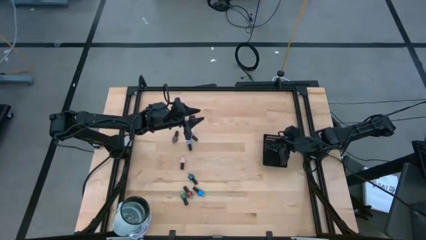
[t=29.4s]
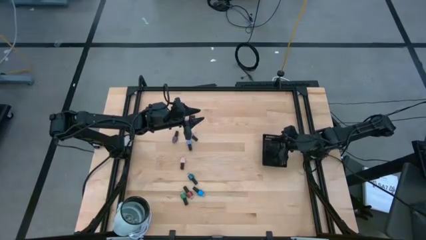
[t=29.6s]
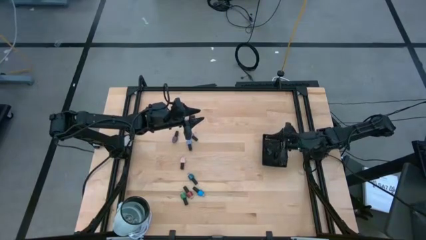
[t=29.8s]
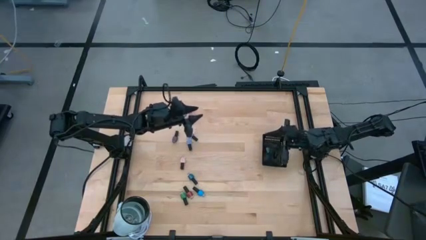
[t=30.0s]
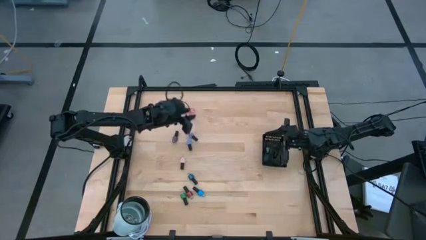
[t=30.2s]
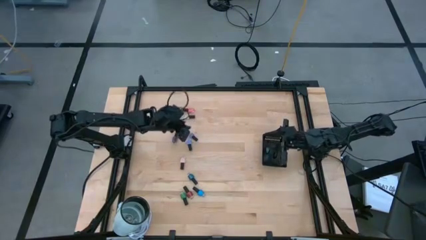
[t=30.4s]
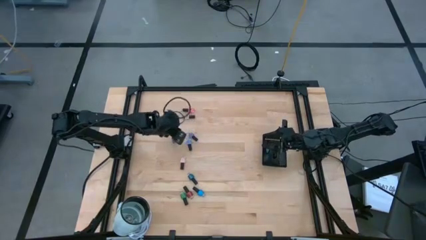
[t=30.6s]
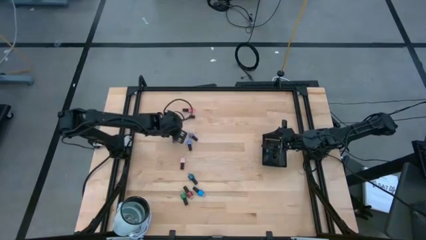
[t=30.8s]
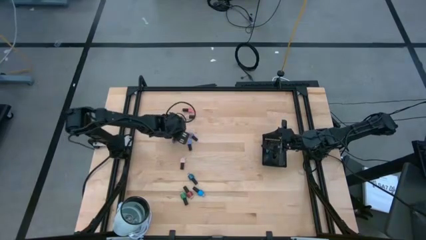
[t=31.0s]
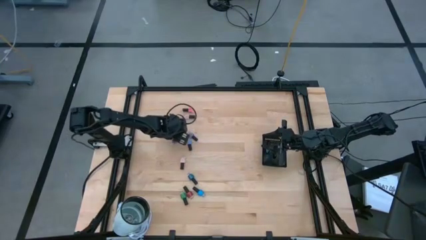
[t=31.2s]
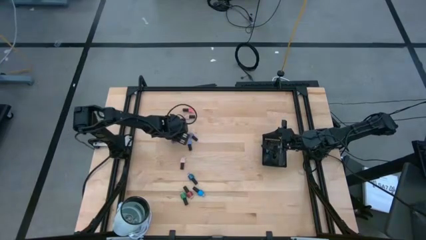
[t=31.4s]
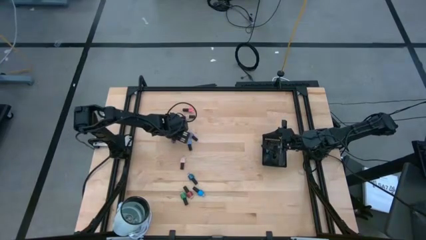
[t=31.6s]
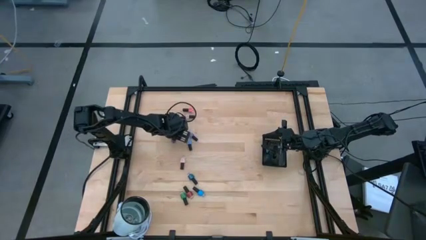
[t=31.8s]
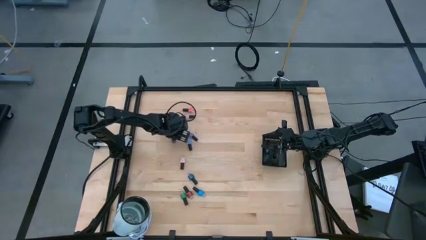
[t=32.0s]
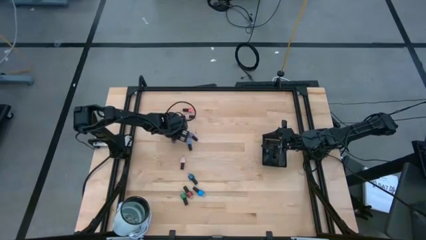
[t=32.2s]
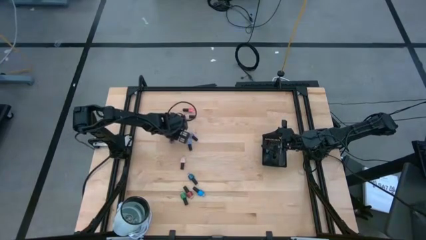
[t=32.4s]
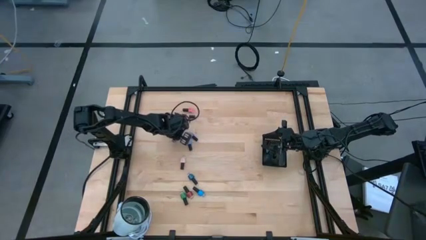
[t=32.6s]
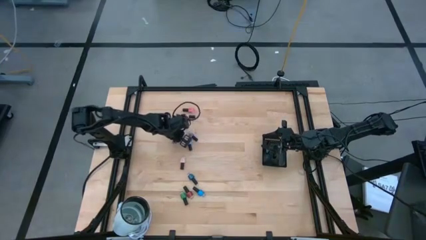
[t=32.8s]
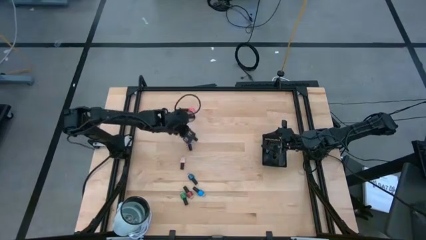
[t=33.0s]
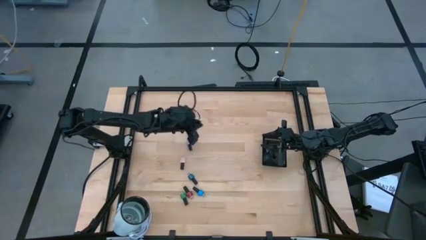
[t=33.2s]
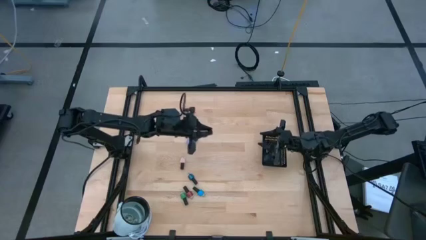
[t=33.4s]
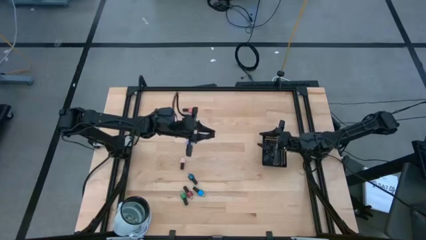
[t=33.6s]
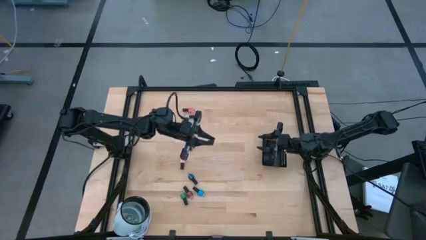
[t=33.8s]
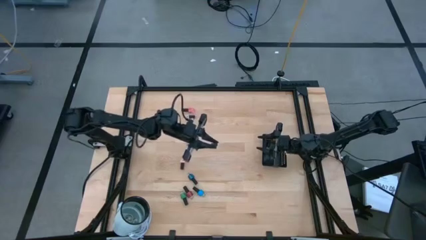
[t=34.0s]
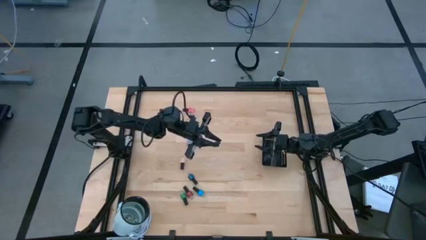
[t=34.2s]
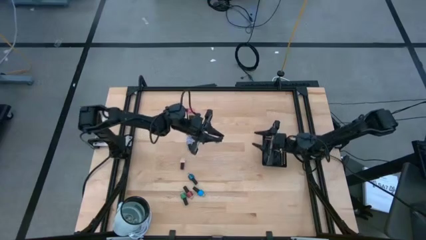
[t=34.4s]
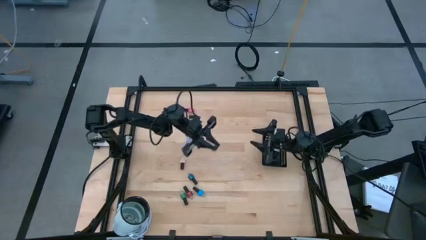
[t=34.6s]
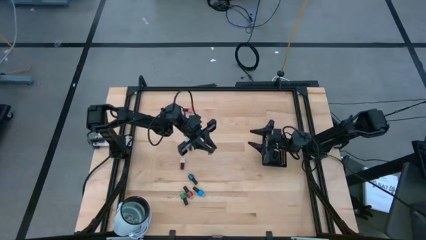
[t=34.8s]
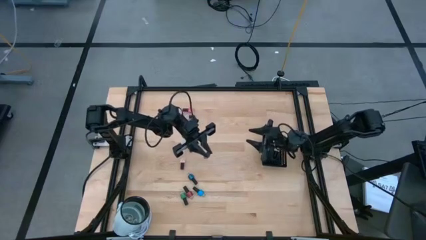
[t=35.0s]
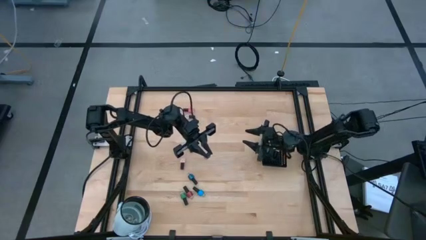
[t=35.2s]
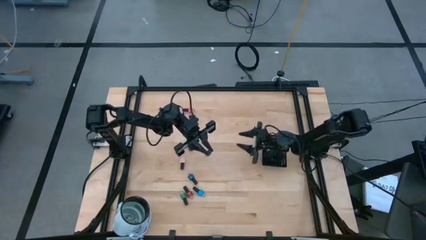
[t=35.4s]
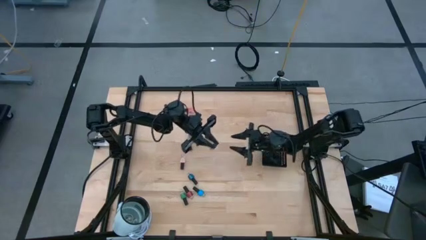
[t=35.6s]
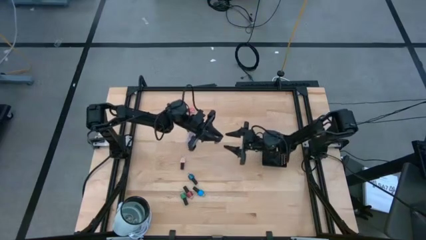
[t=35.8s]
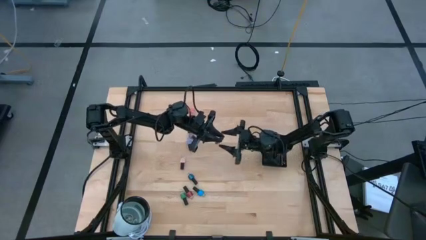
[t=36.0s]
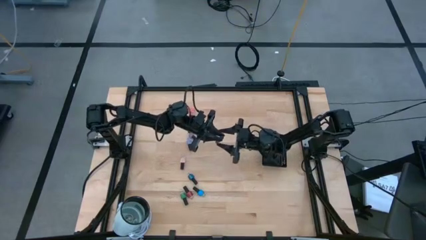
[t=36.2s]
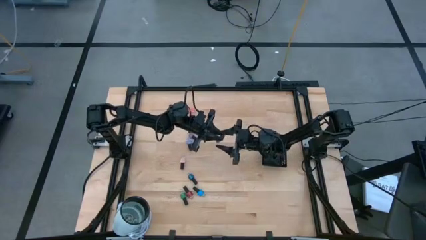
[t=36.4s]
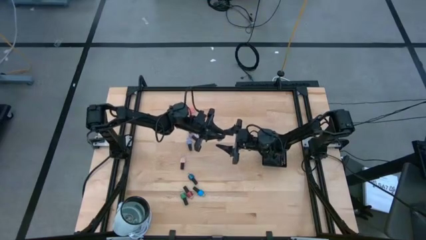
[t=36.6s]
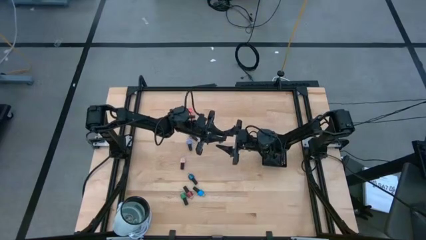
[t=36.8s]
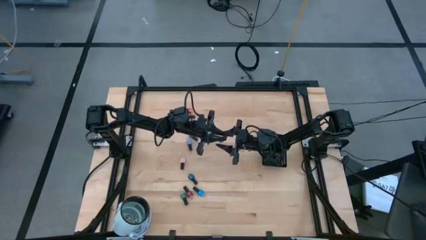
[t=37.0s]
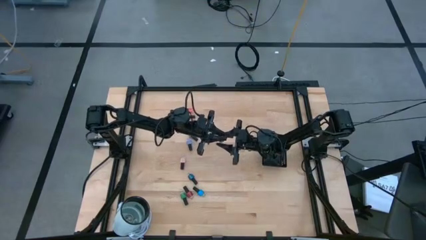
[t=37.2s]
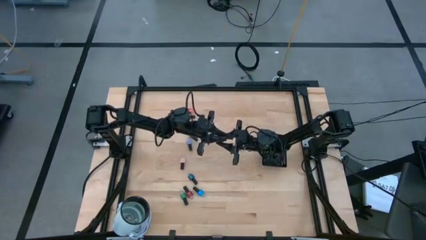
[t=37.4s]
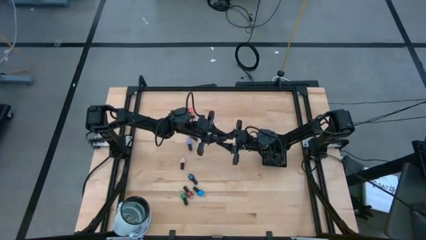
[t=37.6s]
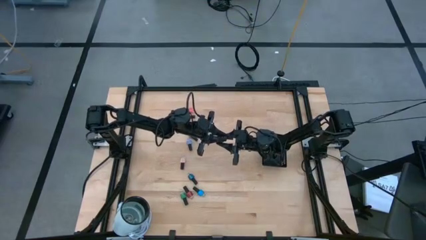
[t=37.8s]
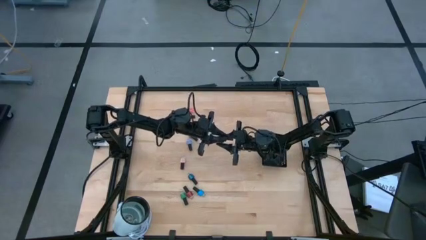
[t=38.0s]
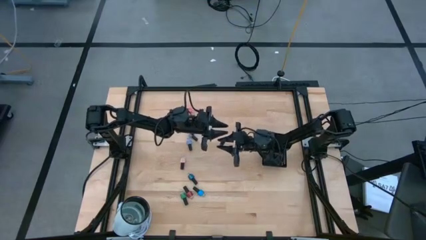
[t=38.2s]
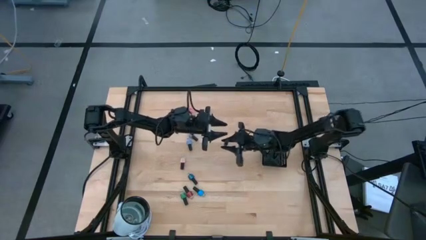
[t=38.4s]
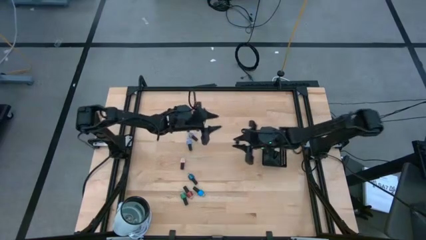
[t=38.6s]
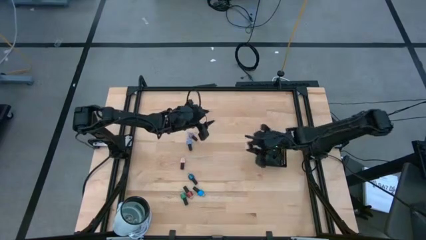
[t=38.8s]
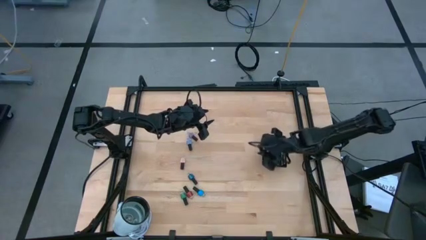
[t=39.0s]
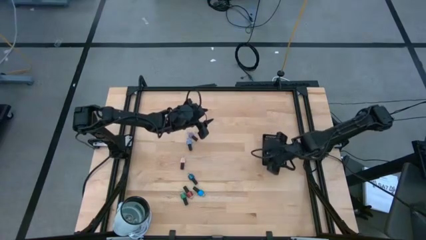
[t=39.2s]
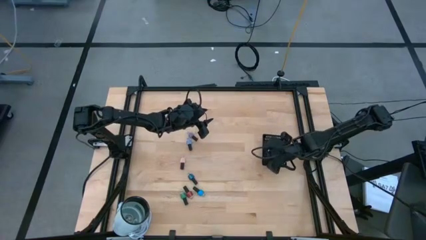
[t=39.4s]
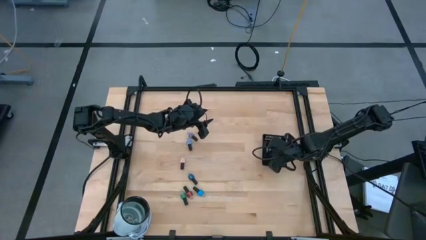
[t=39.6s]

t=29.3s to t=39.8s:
Task: Pick & Place Nail Polish
Put the purple nail polish into the black basket
